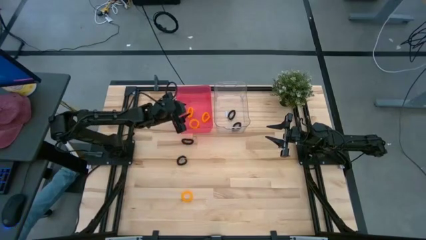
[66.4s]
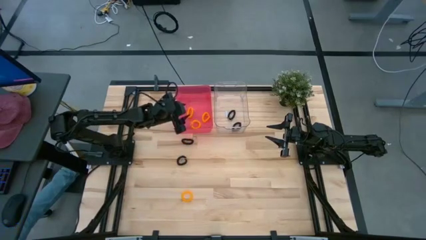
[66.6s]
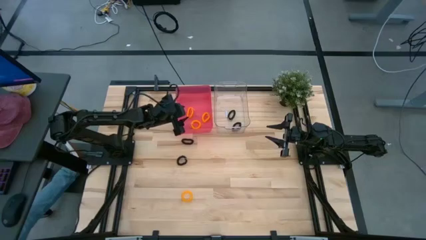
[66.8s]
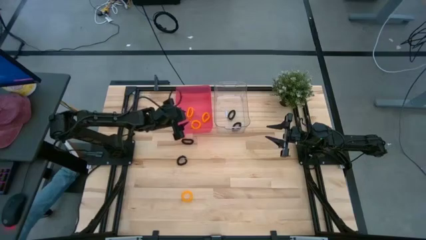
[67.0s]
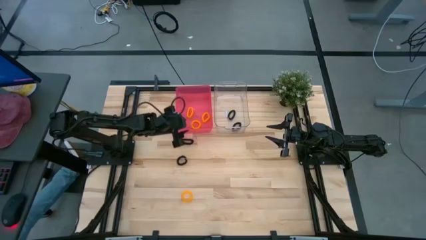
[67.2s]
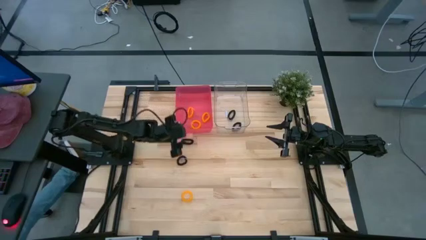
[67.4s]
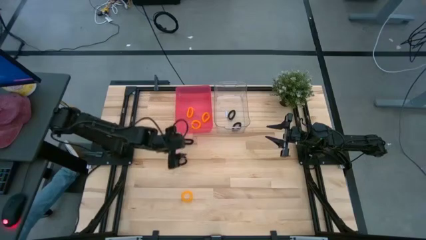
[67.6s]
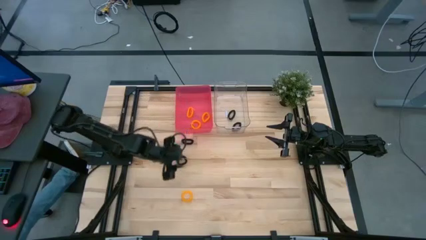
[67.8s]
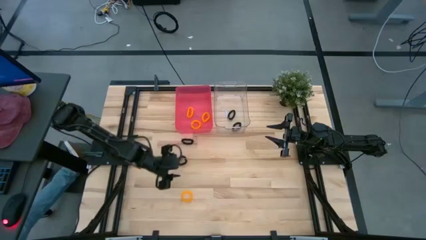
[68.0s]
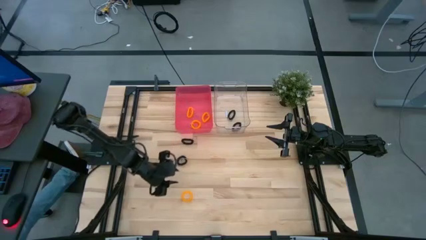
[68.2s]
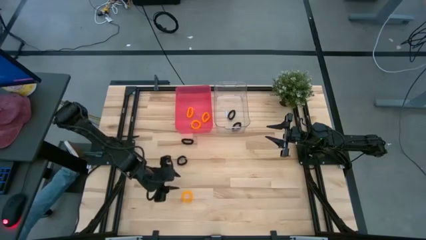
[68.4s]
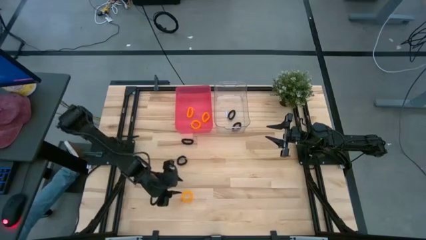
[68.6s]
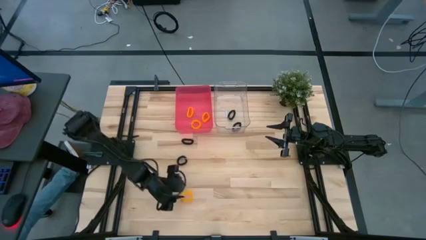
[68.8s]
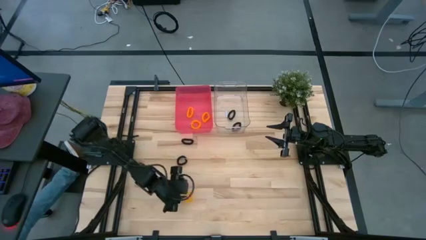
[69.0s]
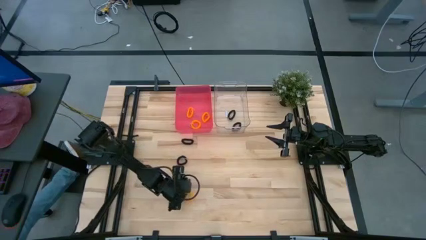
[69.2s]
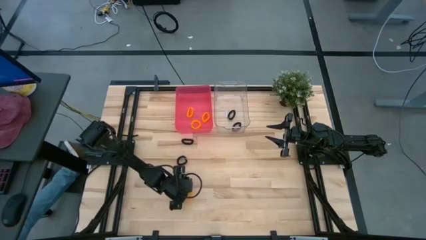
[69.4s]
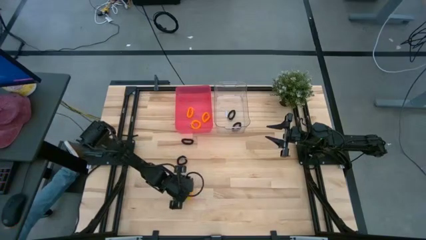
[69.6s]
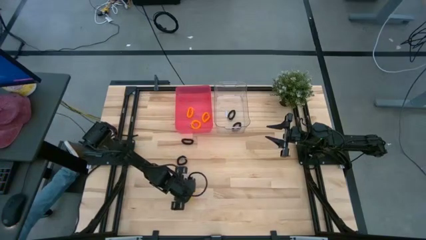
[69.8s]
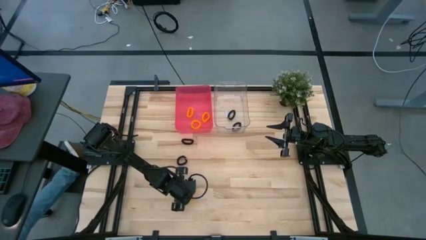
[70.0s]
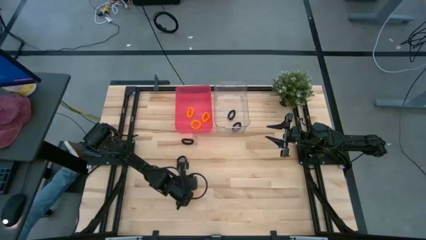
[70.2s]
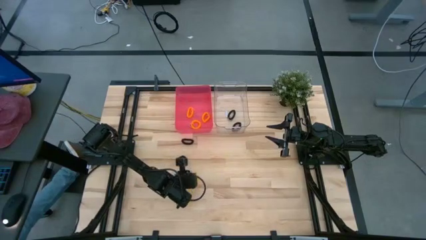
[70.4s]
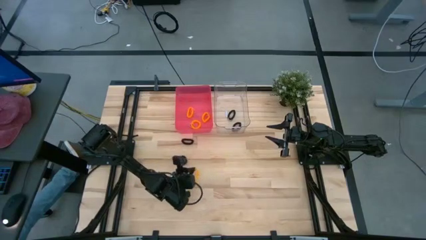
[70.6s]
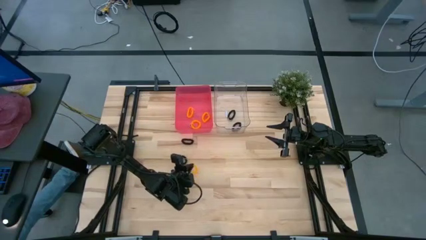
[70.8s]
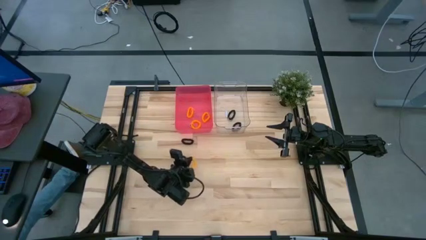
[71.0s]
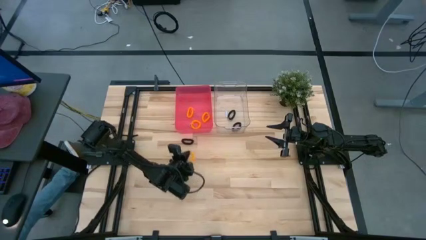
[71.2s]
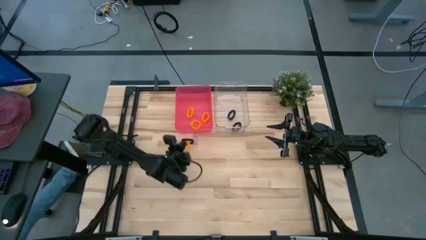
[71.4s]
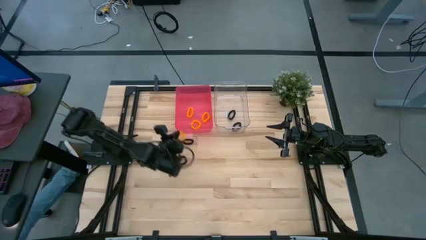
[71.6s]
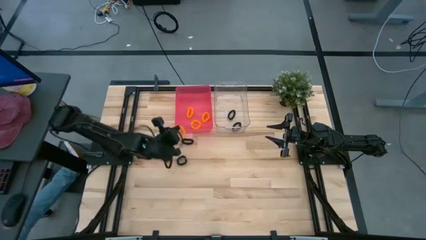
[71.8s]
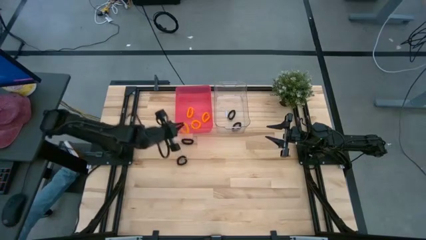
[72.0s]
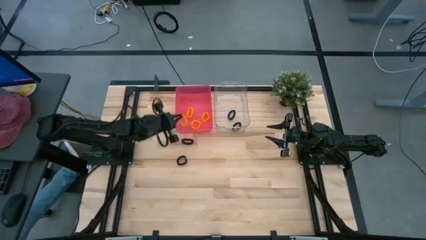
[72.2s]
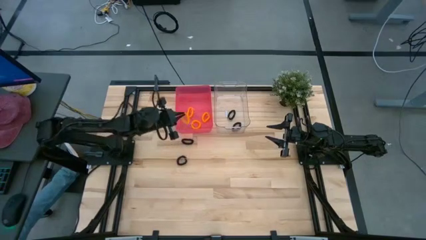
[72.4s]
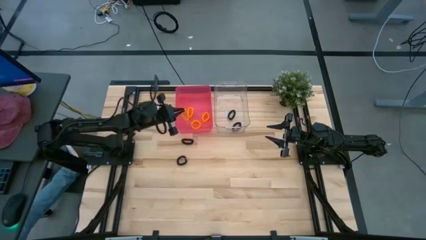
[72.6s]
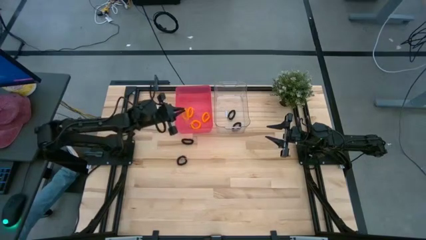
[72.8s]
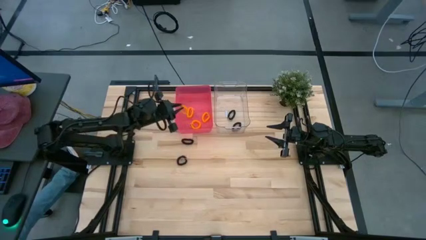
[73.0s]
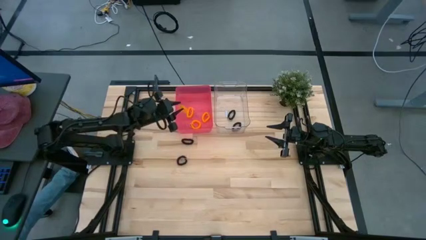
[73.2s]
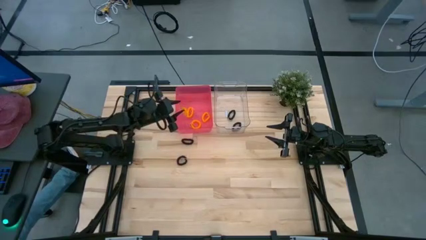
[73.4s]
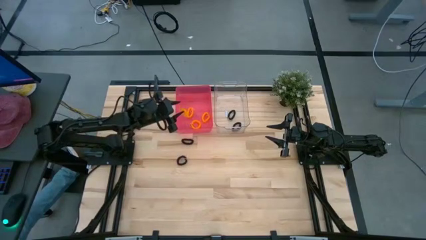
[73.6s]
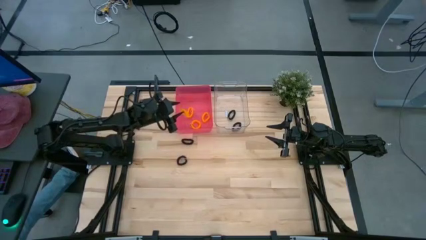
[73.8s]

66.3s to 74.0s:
Task: Sort spring keychains
Put the yellow spring keychain into the red bin

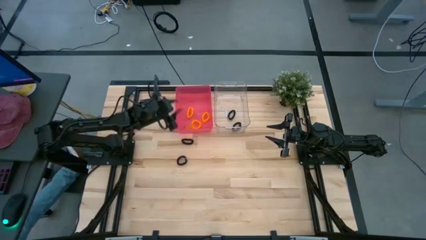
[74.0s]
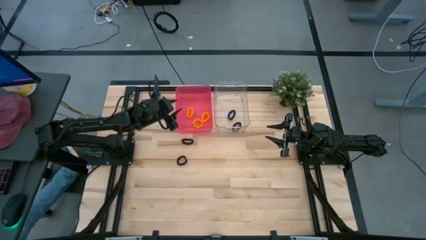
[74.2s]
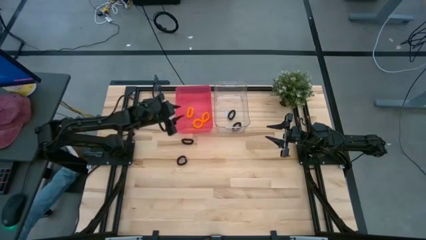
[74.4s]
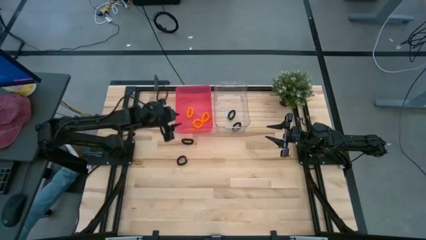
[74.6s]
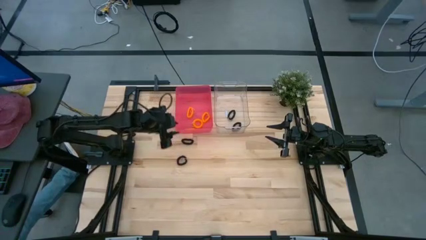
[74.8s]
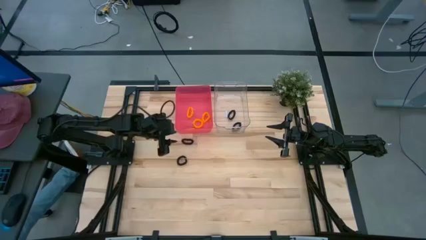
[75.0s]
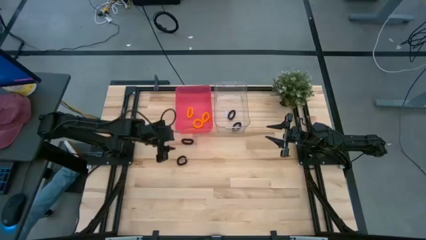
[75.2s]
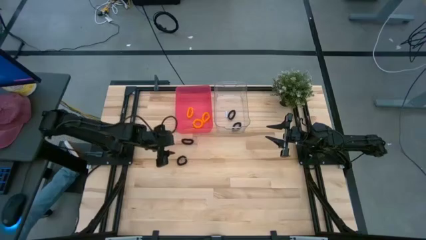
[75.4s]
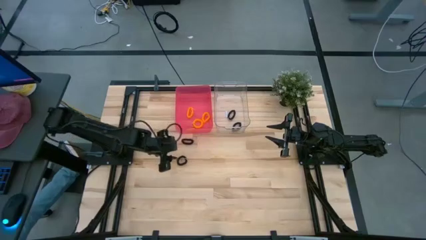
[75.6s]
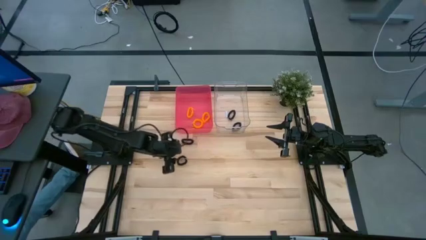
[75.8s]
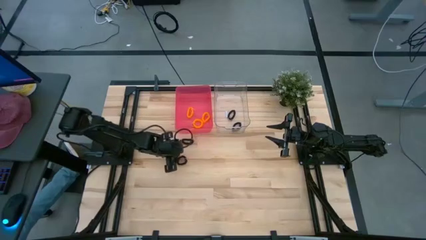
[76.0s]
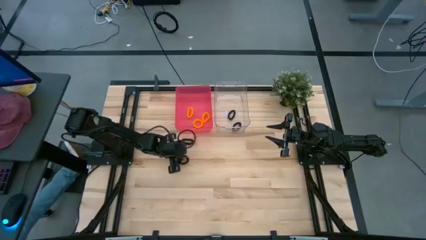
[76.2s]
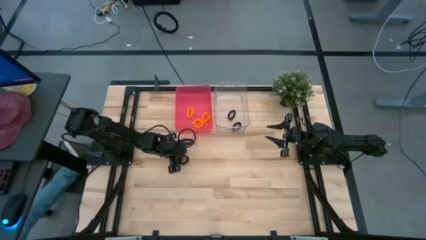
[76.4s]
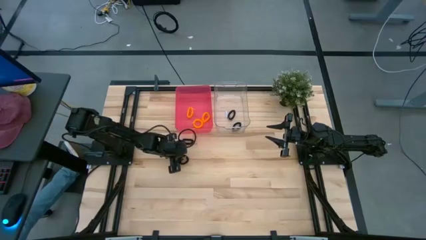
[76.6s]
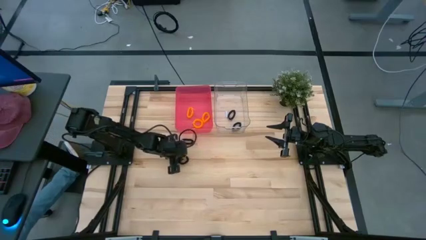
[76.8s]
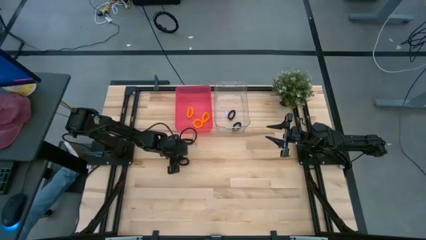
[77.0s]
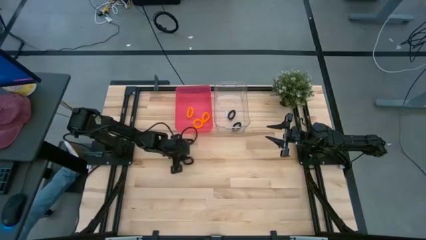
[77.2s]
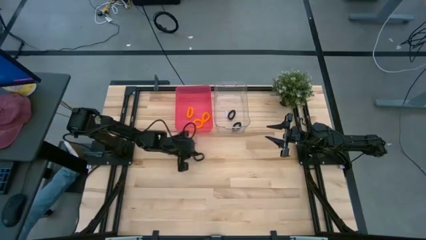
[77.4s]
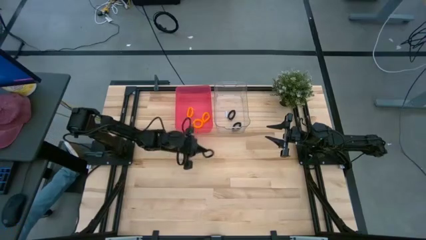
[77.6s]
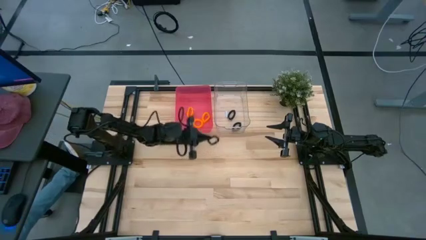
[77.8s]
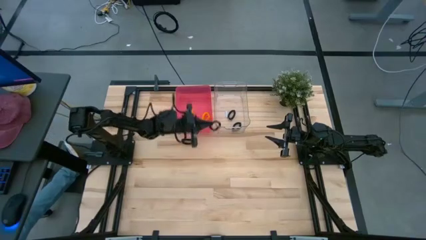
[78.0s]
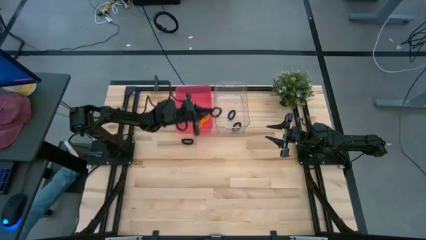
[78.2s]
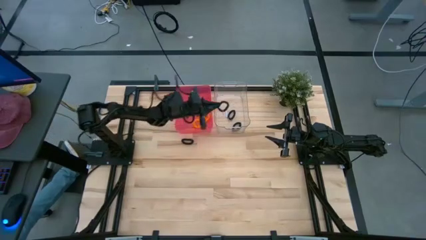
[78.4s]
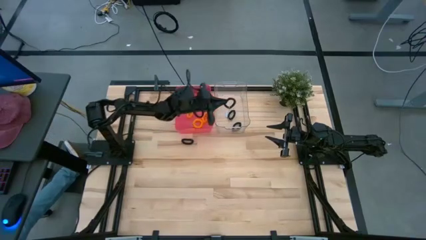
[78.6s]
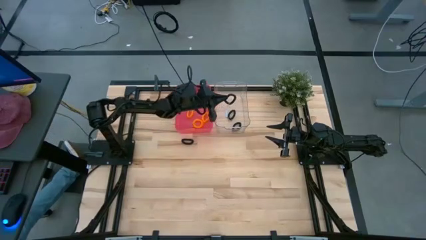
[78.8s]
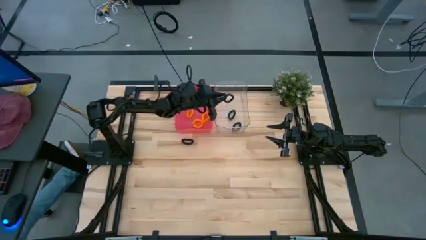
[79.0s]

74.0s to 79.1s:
Put the black spring keychain into the transparent bin

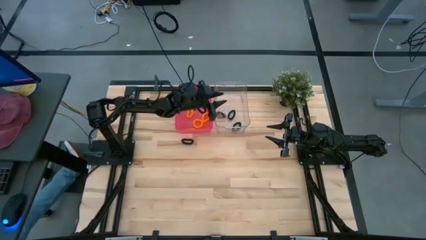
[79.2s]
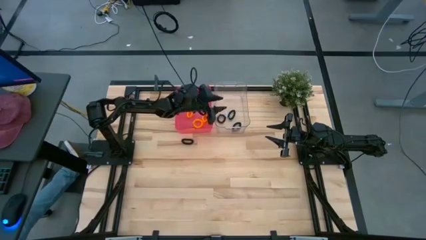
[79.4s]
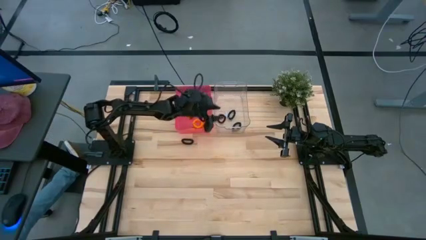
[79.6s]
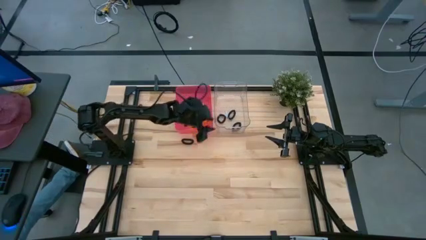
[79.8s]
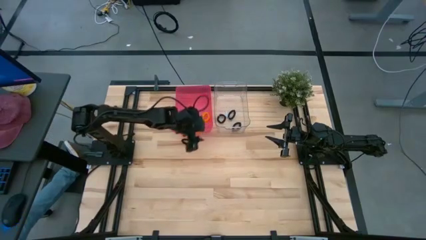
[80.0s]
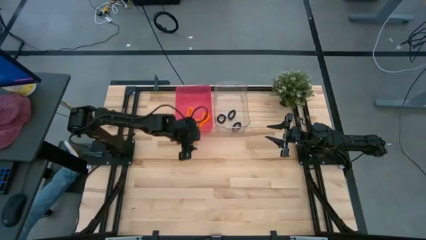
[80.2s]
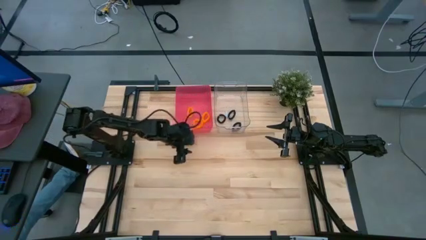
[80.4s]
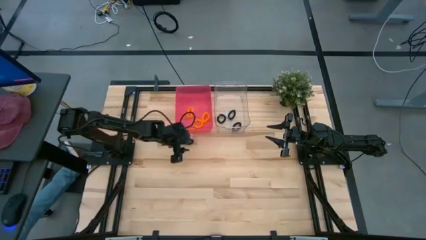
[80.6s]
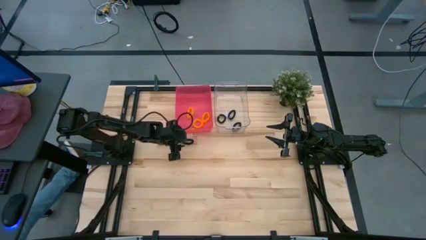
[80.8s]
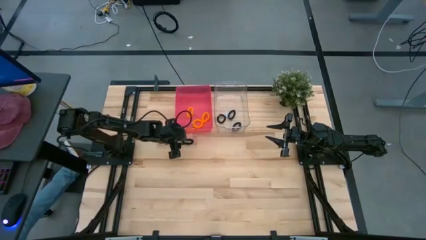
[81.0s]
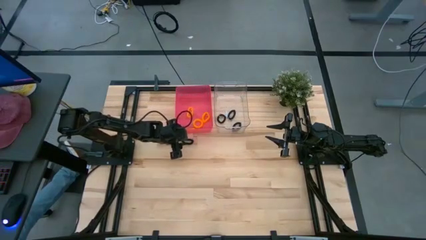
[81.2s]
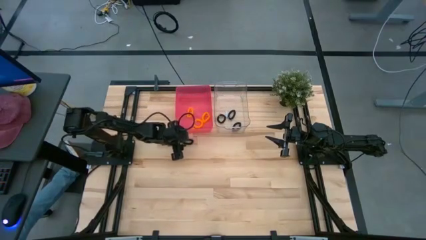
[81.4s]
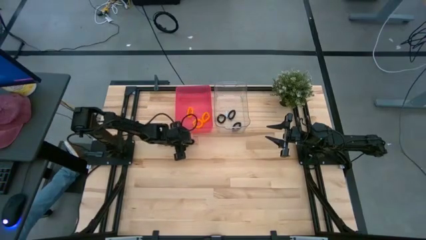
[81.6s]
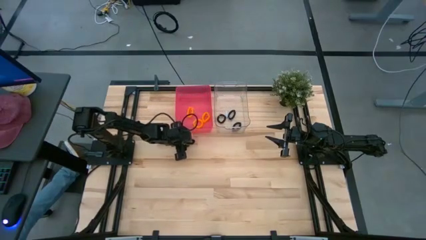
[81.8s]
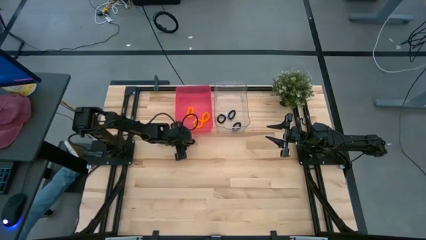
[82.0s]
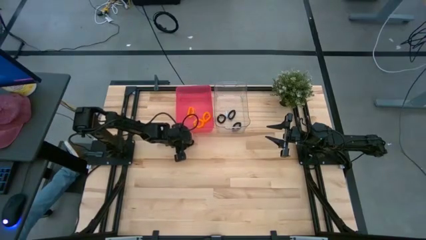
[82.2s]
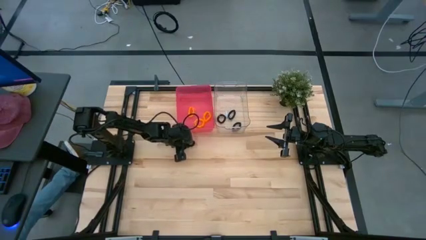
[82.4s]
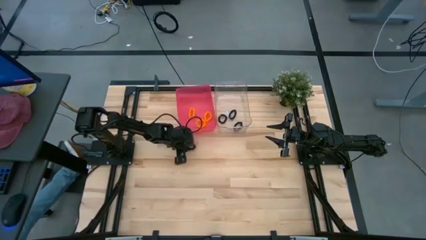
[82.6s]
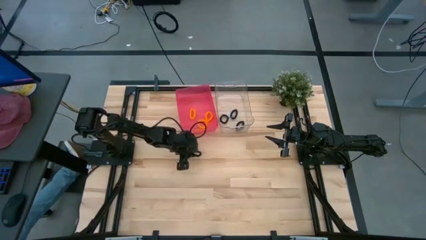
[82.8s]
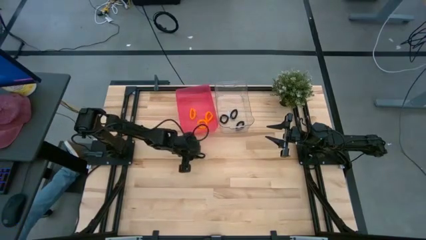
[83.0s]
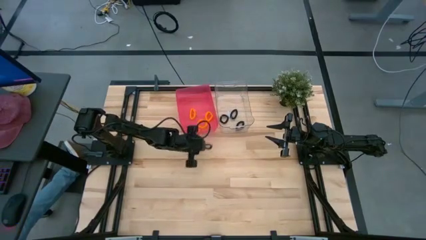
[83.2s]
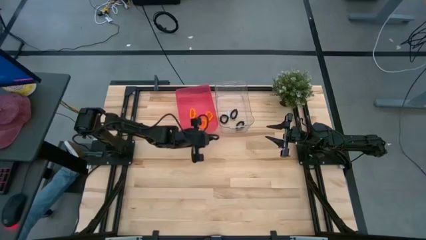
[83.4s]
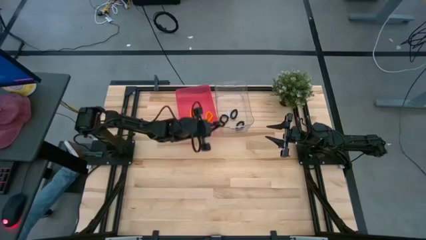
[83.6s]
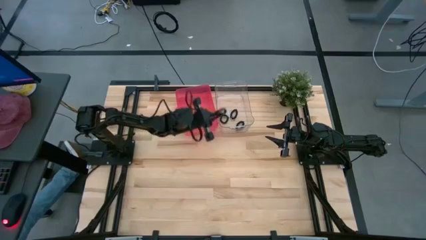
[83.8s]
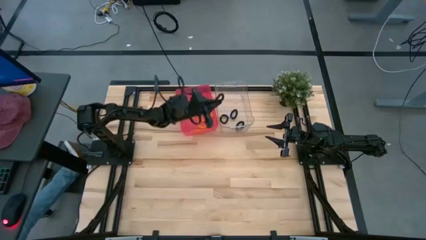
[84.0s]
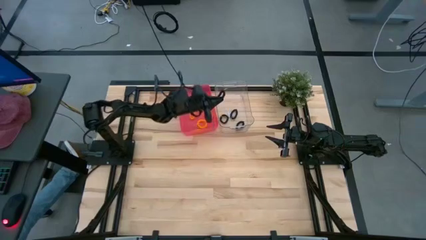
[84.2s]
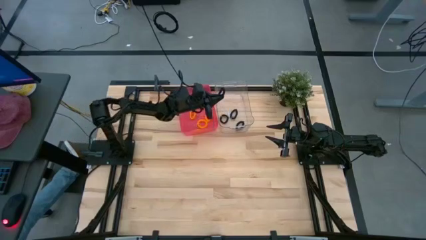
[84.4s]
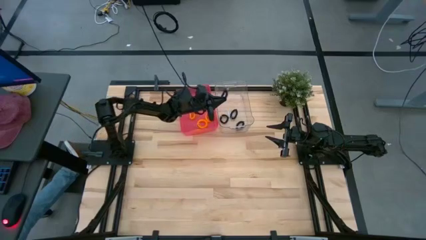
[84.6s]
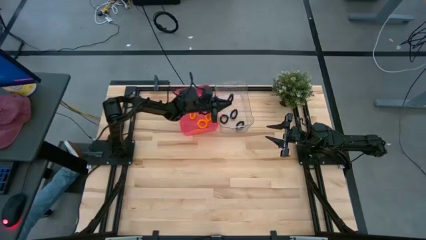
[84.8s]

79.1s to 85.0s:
Put the black spring keychain into the transparent bin
